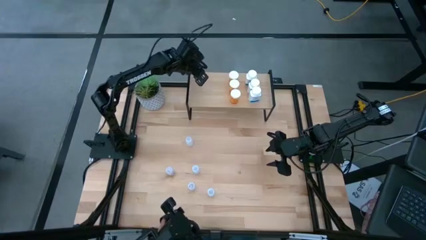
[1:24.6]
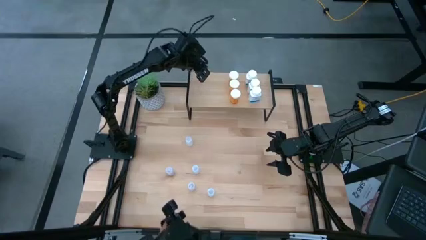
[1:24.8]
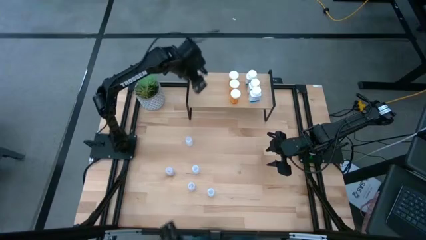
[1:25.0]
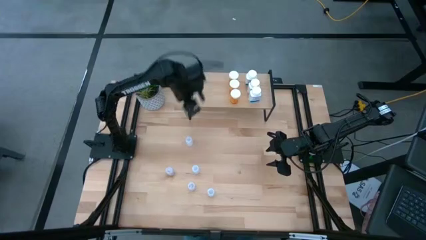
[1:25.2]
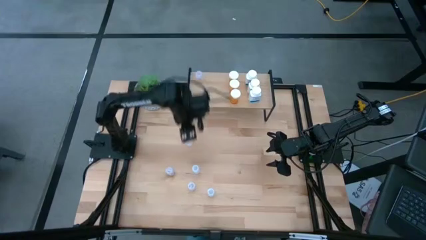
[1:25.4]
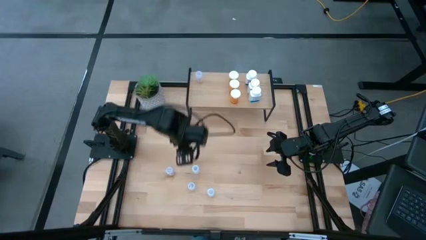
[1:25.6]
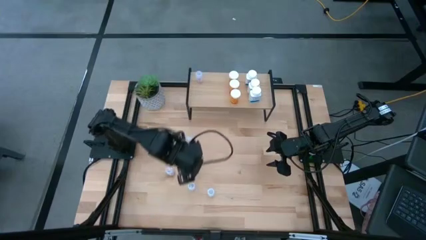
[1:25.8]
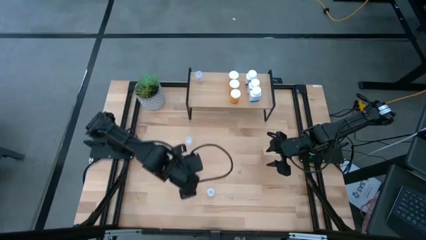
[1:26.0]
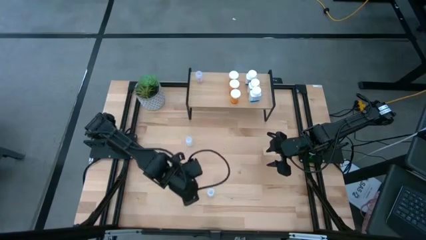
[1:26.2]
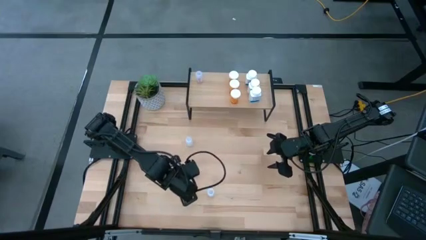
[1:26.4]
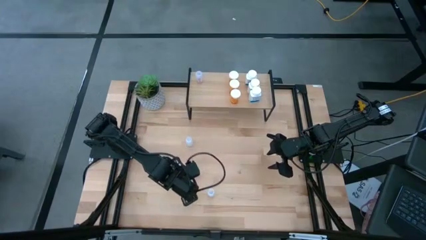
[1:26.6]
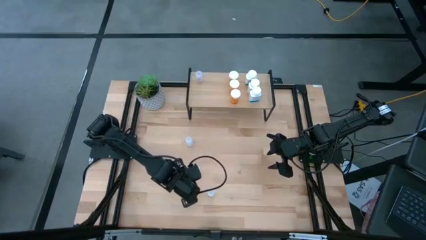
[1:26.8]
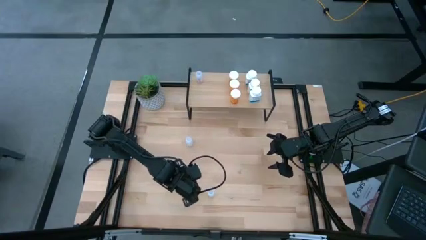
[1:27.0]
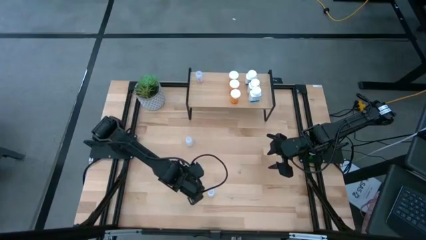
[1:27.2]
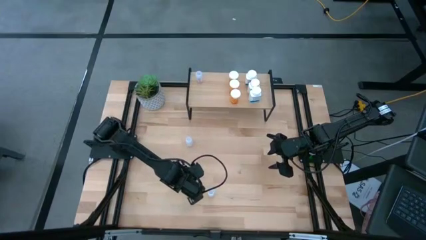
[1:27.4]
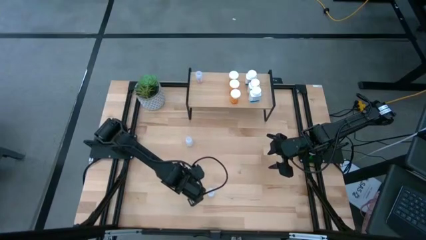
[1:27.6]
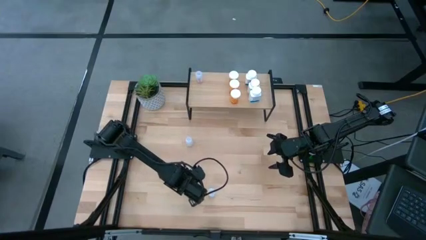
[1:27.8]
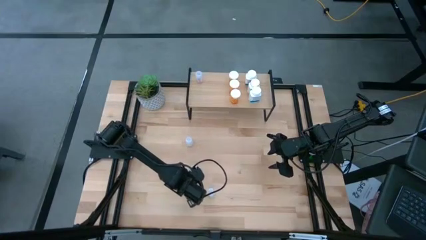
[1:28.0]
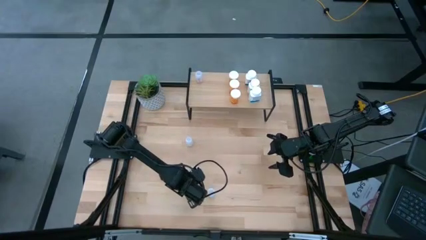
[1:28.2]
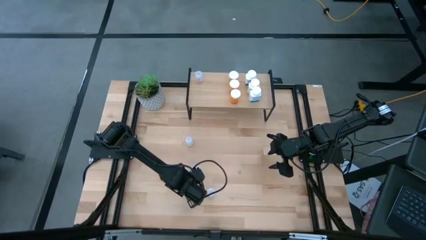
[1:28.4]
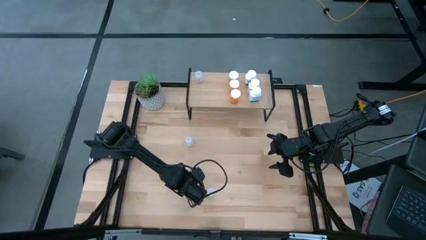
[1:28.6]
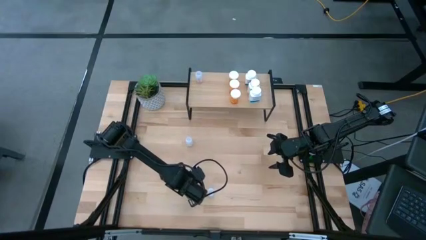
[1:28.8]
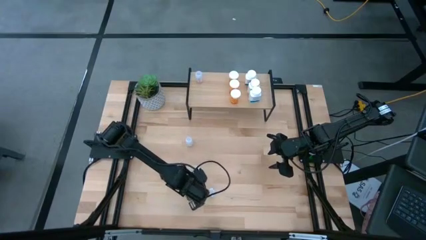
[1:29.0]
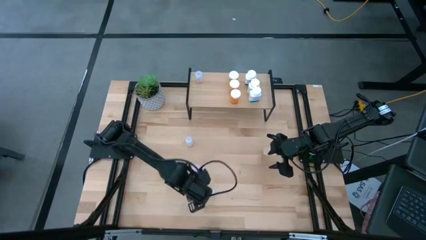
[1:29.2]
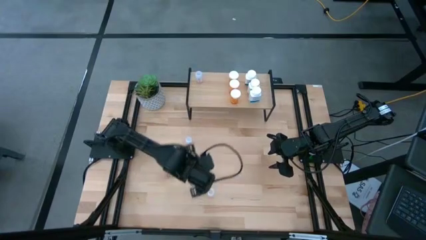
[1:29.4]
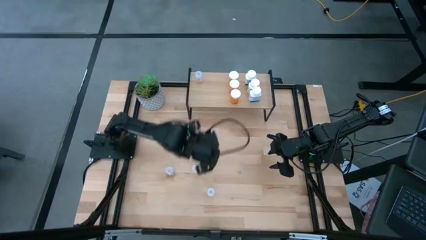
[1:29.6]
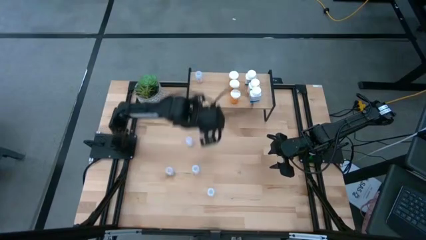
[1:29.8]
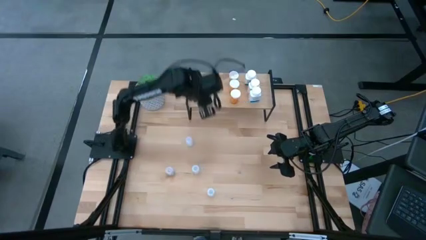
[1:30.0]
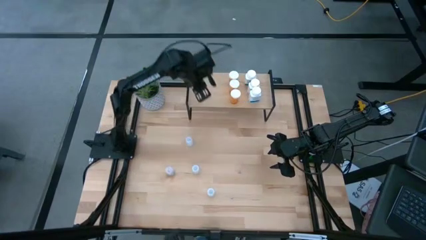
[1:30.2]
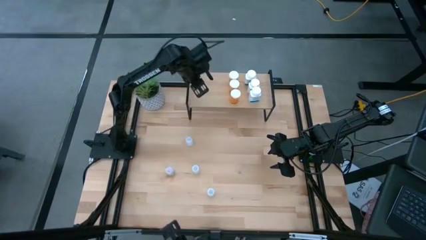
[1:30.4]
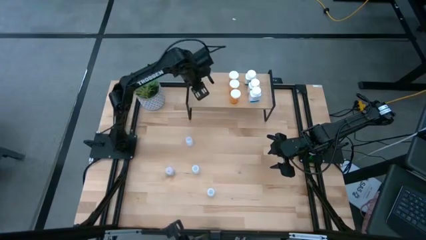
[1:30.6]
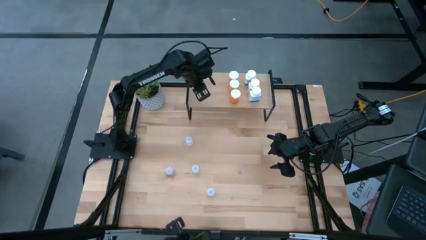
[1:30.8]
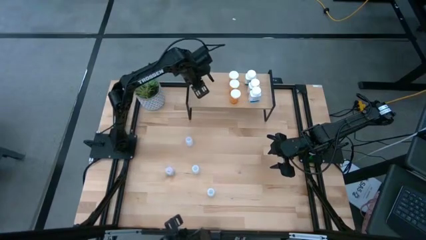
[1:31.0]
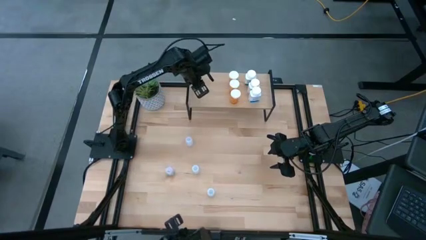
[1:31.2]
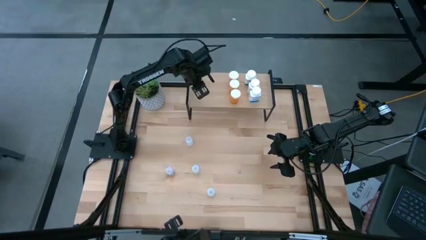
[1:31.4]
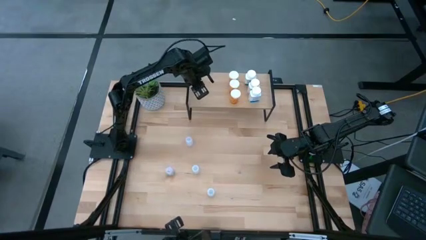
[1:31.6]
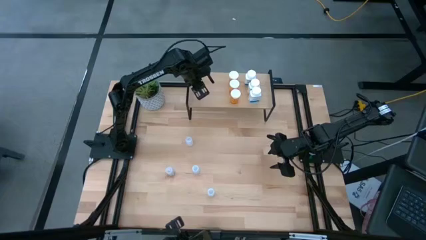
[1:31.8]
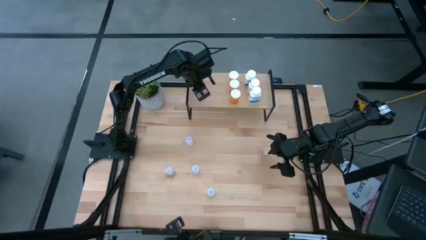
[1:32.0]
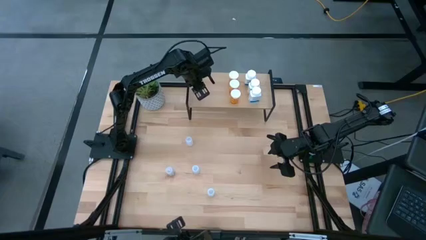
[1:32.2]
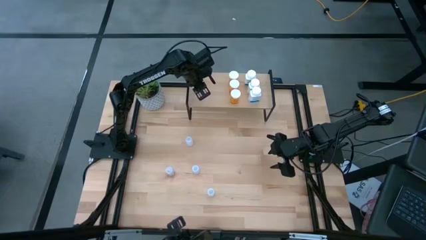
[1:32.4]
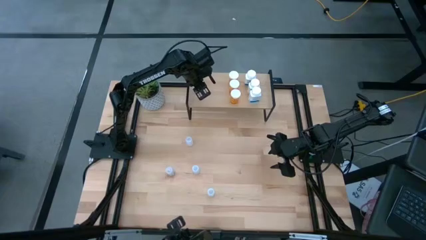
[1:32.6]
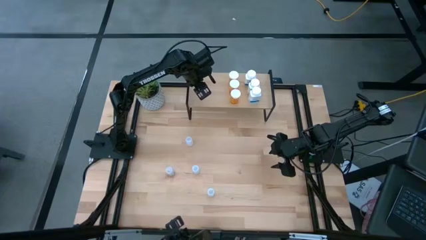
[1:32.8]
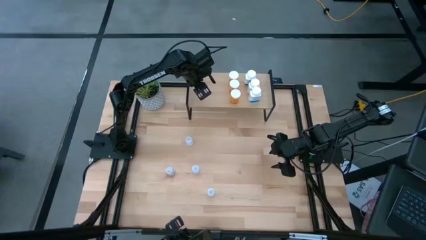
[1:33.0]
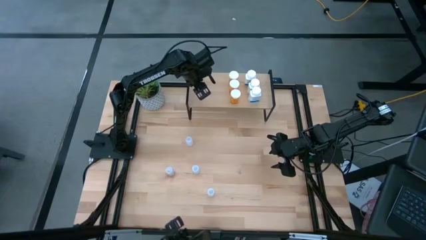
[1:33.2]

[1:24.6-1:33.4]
Task: Pick and place medicine bottles onto shelf by color
Put the bottom transparent pill bottle on the shelf aligned with the other transparent pill bottle

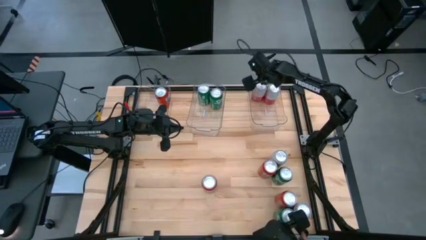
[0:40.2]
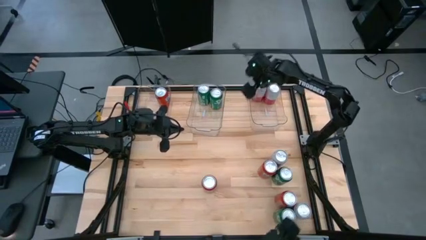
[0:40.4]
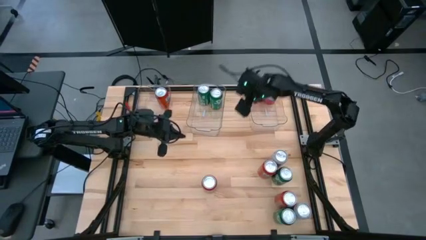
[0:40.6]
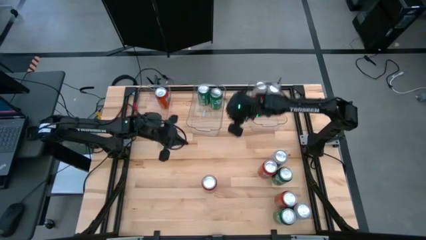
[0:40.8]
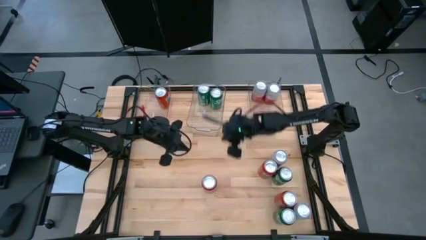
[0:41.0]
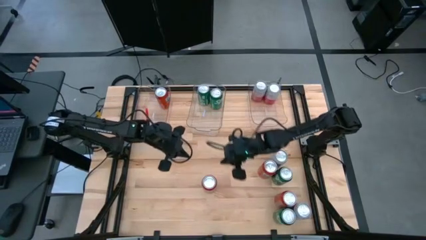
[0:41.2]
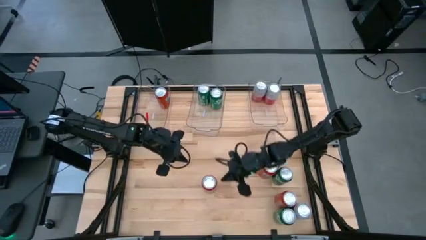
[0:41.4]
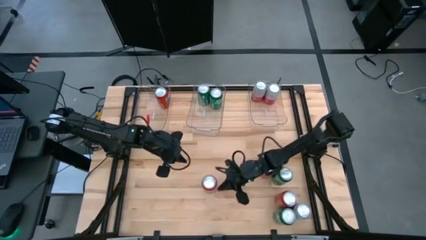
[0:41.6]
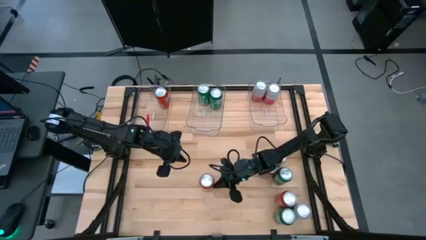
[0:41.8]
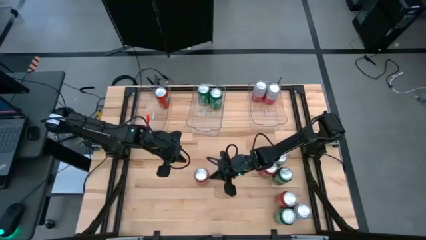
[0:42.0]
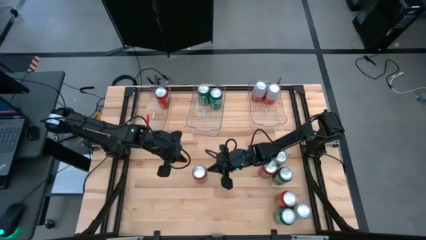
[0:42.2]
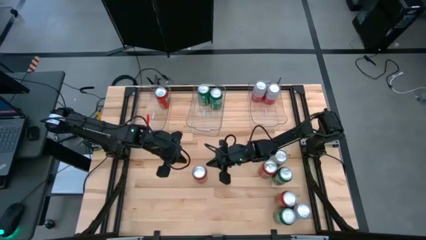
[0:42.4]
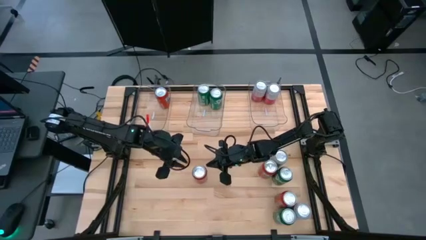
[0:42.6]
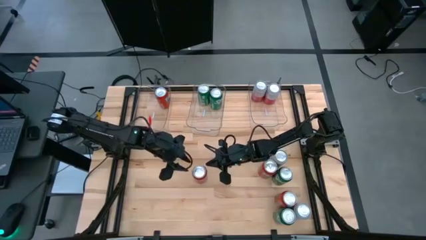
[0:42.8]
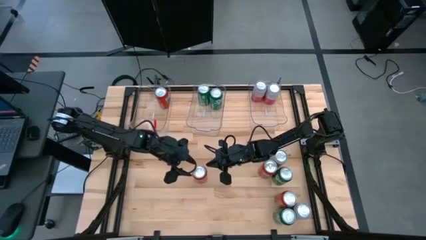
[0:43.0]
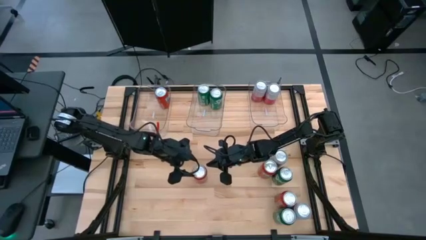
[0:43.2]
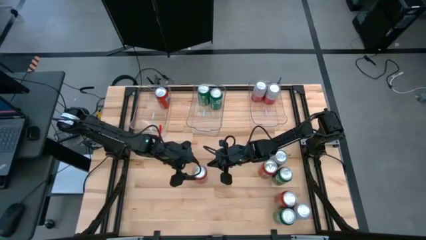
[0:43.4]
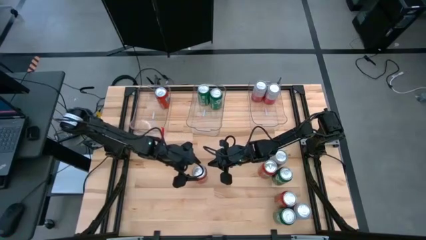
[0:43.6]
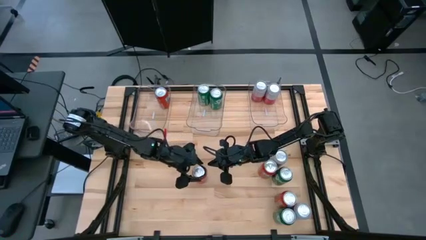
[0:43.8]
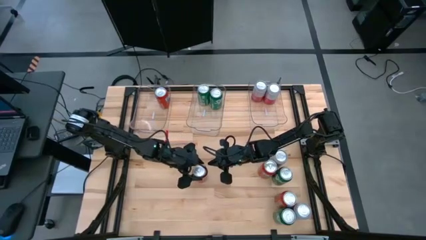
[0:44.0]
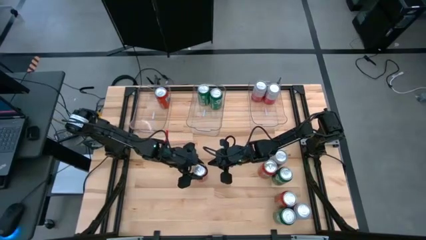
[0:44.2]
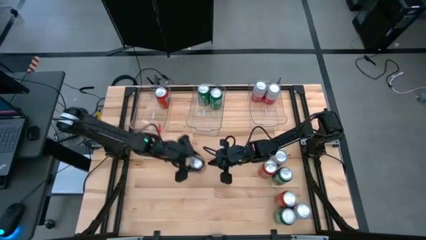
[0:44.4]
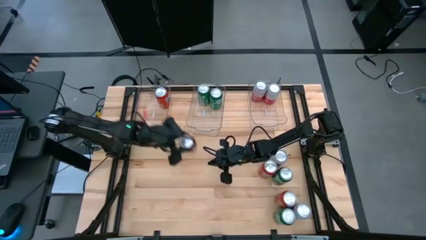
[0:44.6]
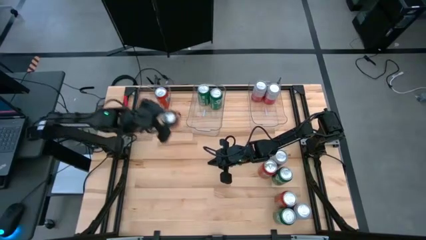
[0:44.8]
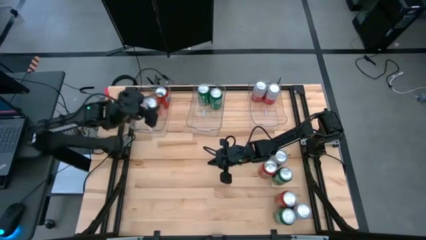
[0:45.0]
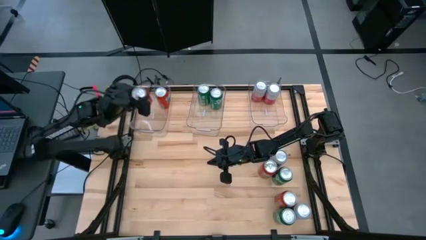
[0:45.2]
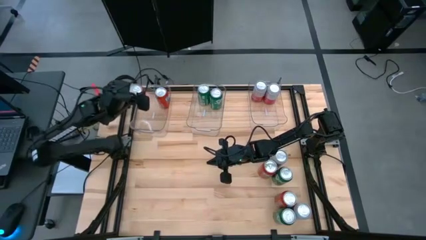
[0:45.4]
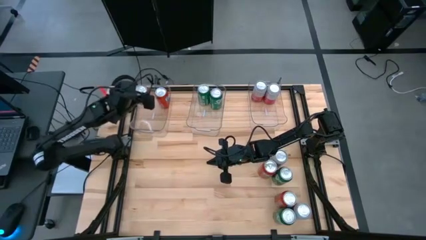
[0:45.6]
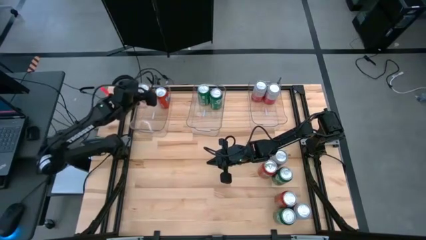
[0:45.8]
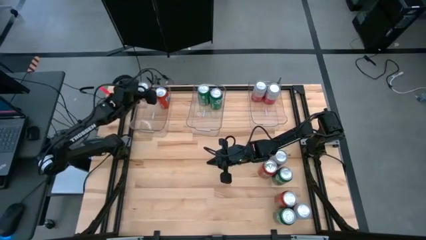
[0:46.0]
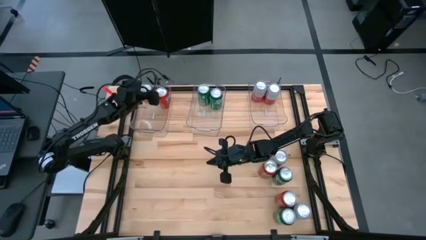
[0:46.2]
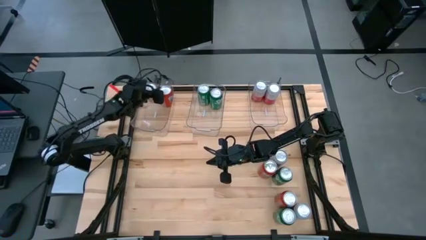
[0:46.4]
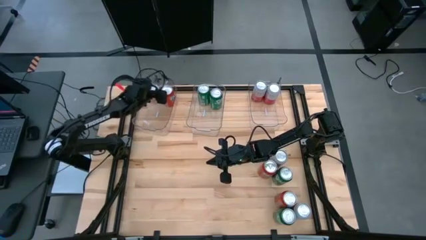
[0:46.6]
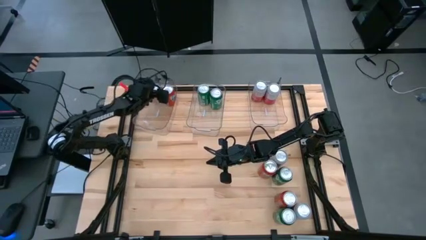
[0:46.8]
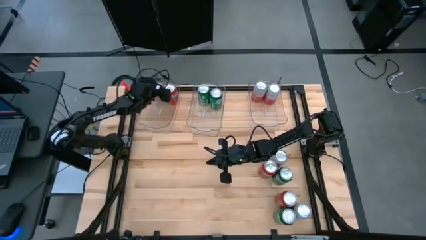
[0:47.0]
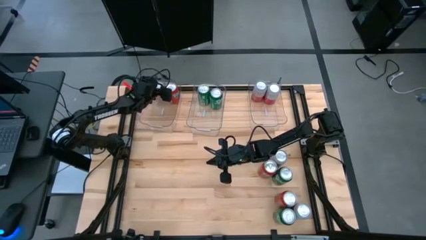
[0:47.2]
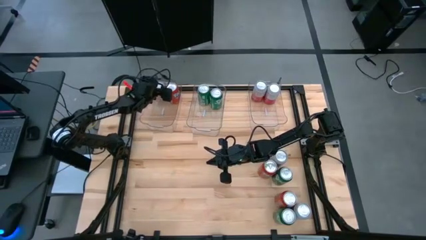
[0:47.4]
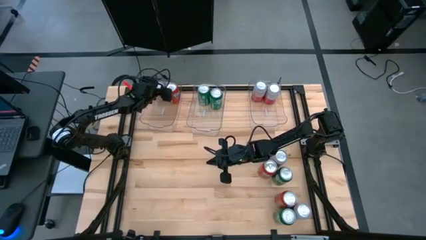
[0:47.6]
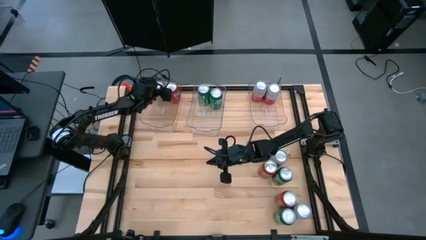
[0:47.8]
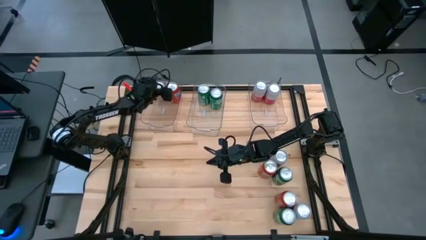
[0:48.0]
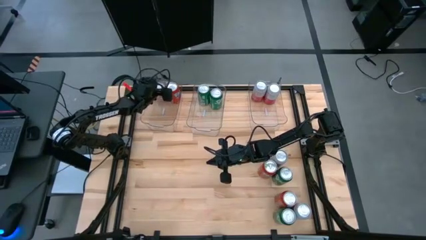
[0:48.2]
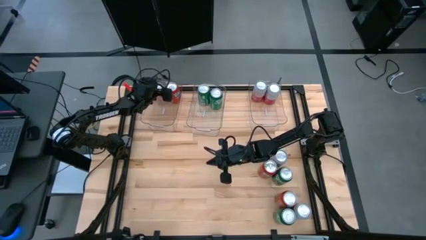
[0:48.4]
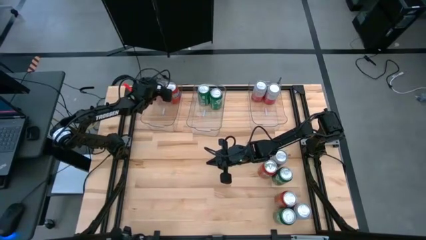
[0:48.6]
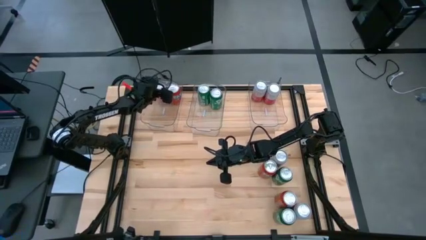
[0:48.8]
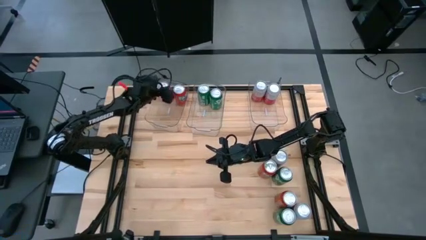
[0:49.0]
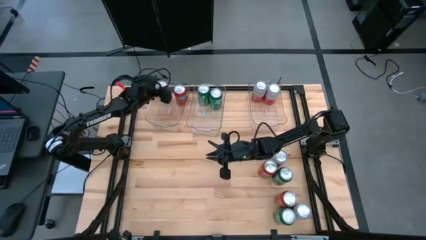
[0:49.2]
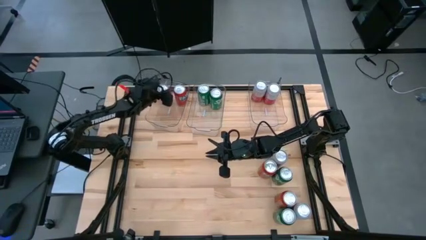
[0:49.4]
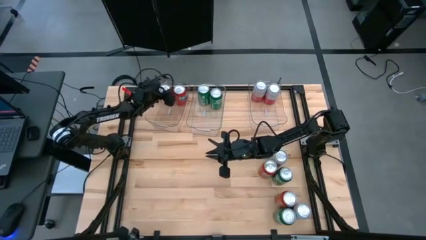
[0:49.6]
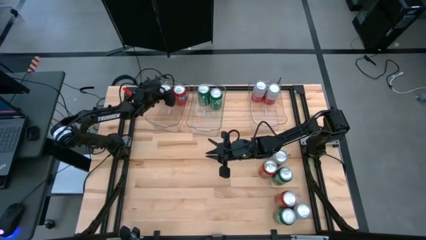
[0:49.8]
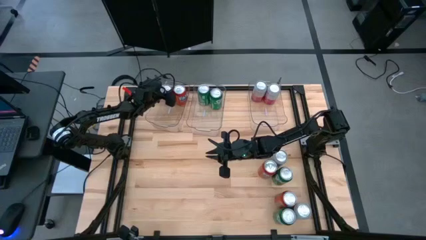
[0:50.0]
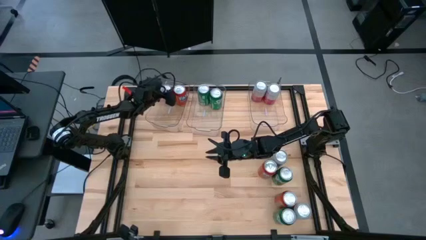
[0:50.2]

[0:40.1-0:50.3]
Task: Sort soda cans
Put the left red soda can into the left transparent bin
